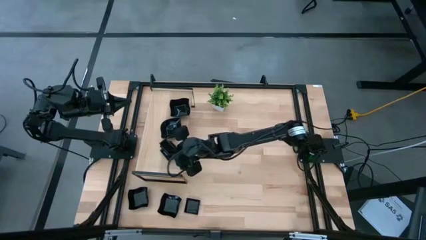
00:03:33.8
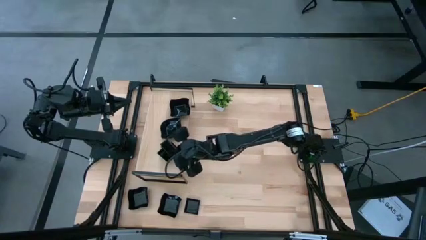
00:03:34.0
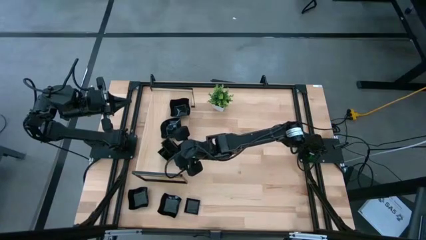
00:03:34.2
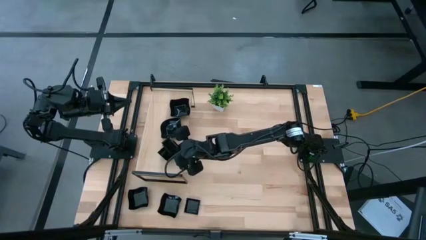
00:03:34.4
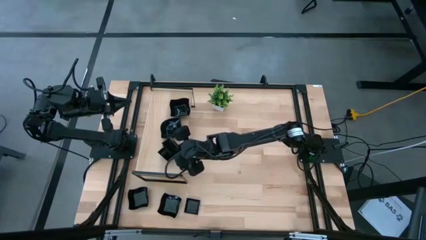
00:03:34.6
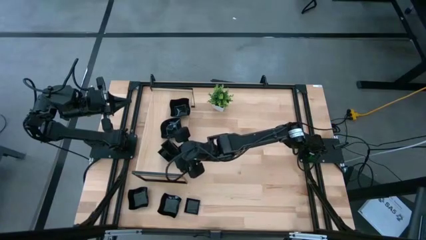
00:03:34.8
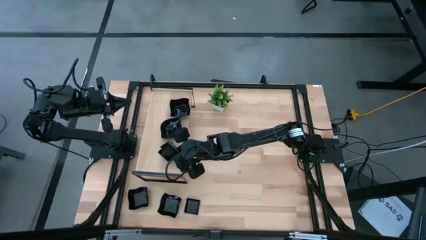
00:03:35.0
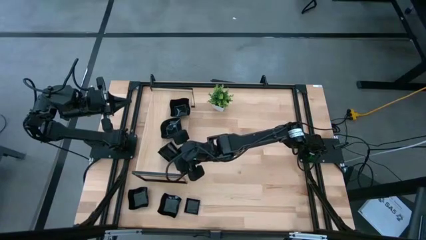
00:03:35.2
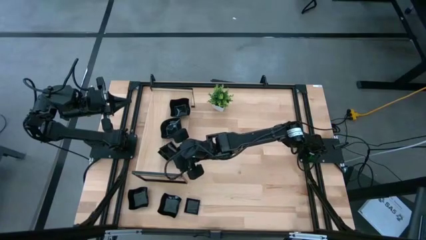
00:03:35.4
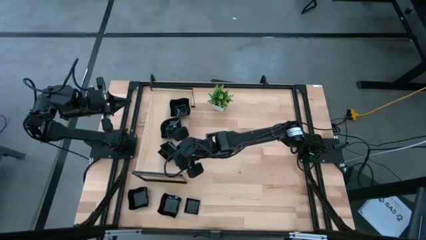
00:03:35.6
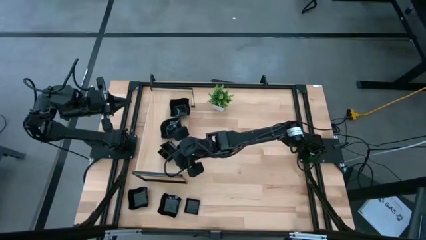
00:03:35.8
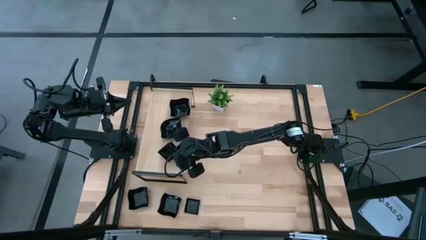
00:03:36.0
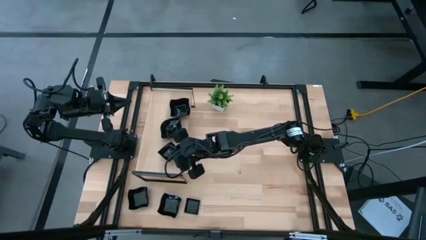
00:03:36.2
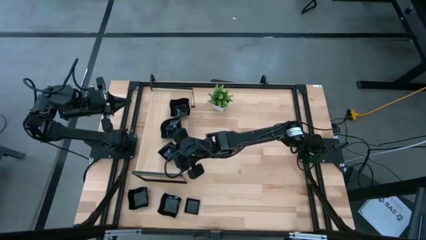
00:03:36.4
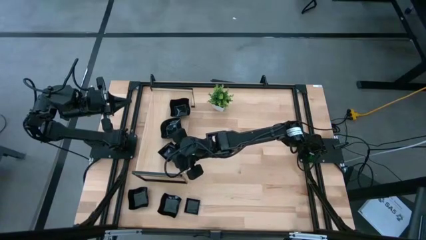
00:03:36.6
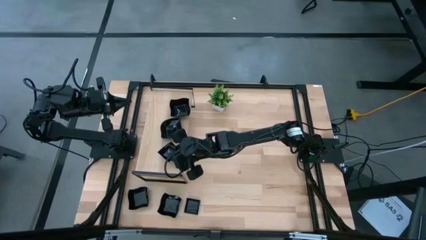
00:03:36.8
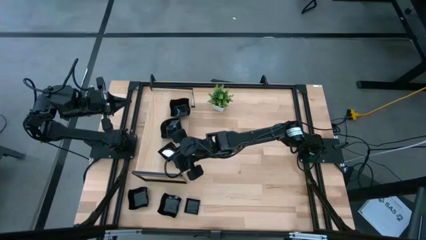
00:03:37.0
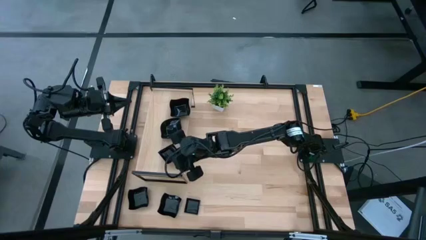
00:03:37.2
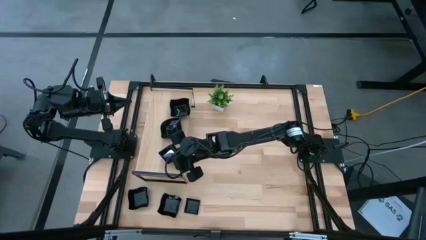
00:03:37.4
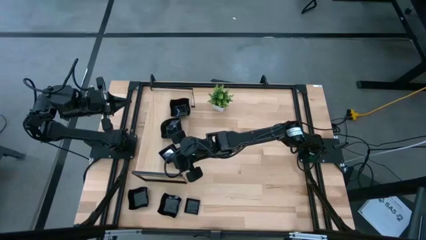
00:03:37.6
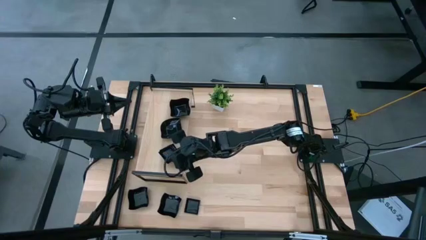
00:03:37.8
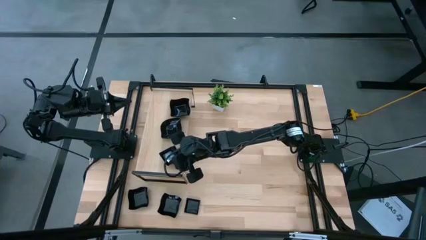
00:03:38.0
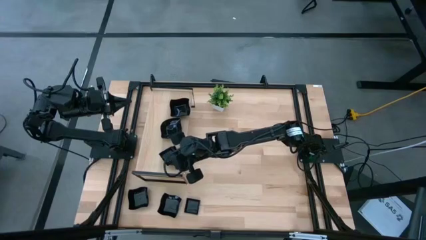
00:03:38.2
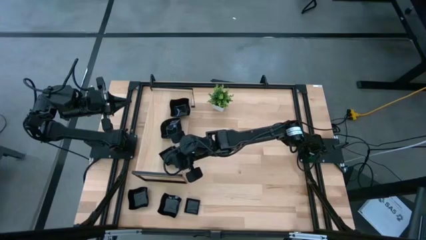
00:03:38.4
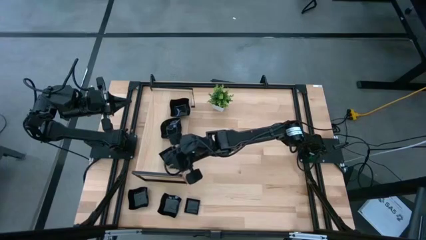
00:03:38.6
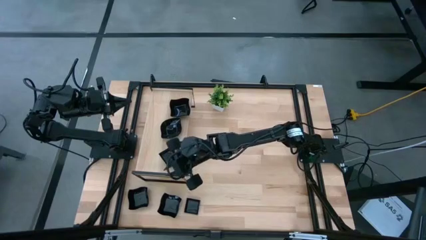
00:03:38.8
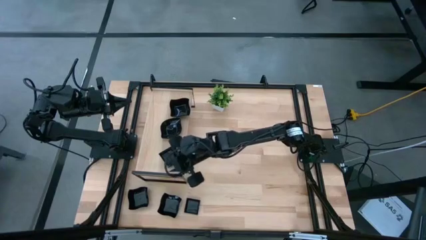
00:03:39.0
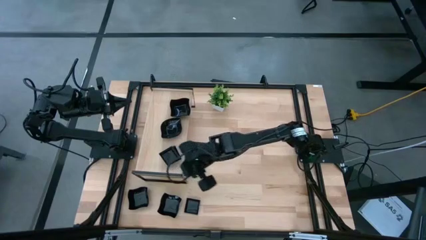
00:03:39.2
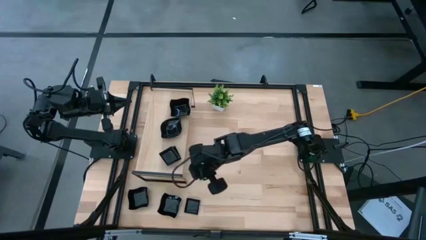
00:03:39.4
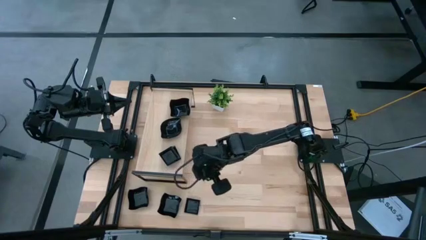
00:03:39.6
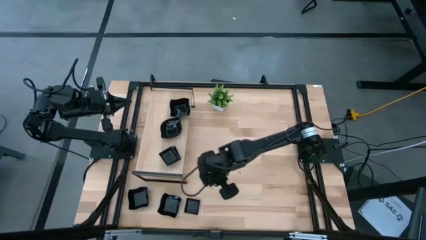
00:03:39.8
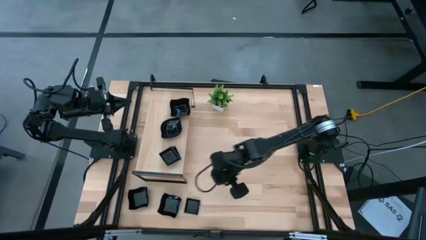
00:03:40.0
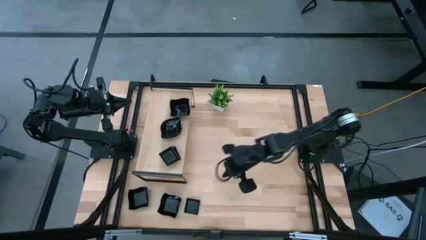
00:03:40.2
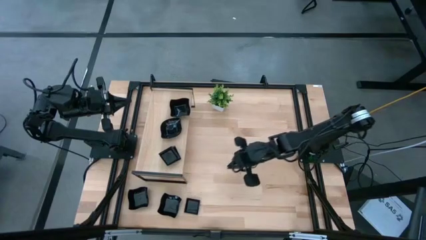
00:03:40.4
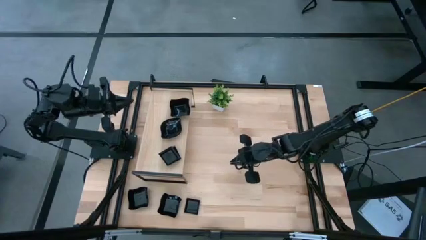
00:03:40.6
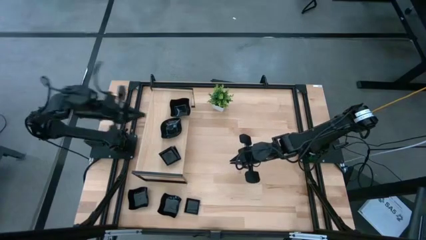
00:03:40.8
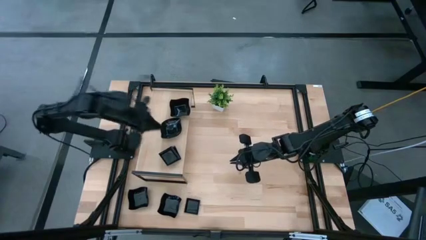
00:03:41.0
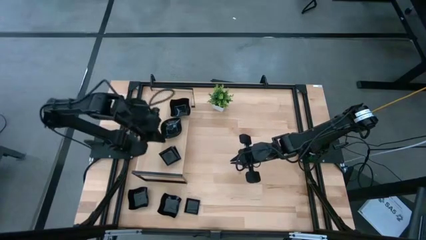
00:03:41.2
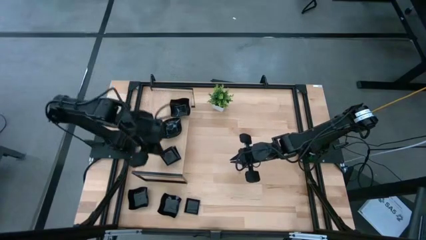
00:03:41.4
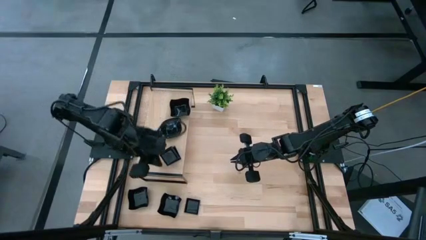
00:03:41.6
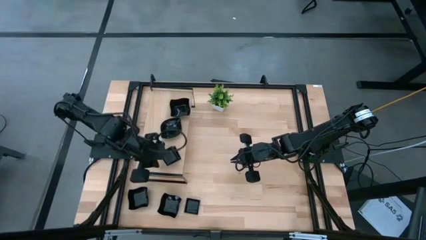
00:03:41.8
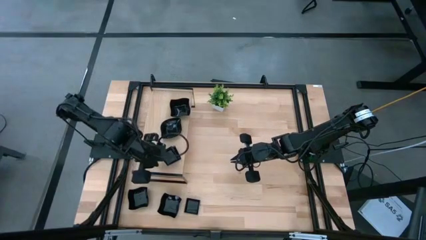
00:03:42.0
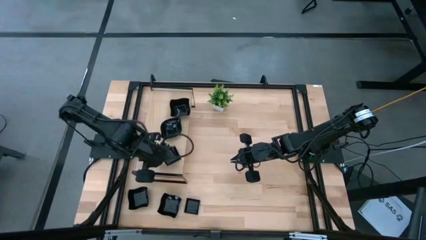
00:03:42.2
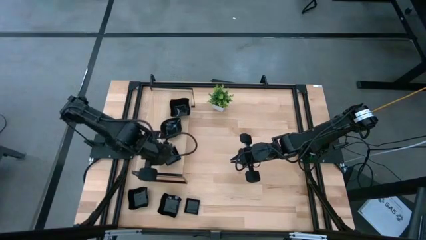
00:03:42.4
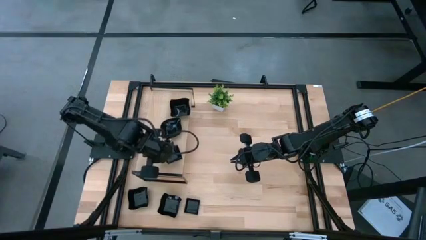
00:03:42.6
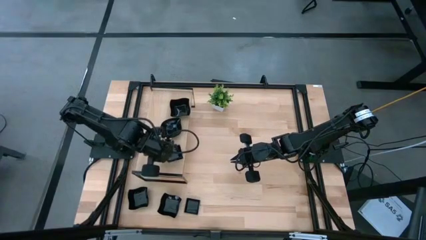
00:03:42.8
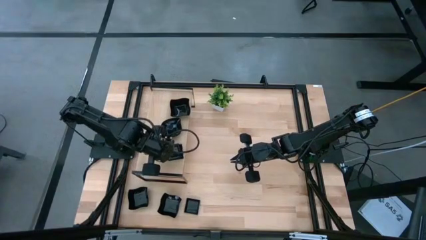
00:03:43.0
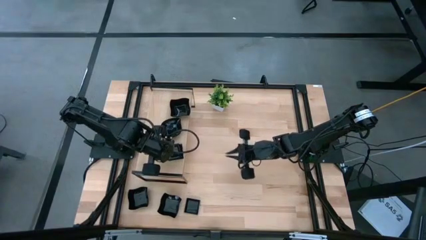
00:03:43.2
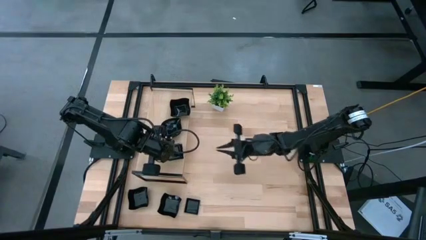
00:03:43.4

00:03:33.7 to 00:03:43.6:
Task: Pick & Place Mini shaped plates
Stack the black square plate on top of the black square plate on the shelf

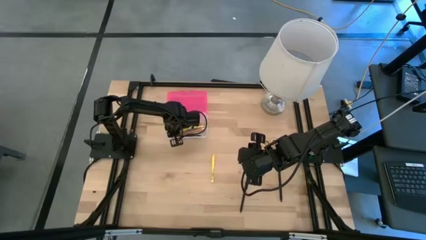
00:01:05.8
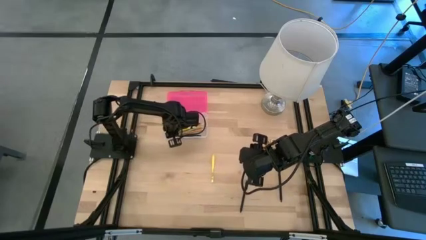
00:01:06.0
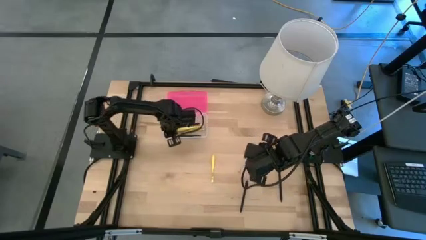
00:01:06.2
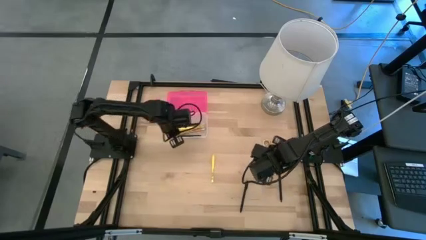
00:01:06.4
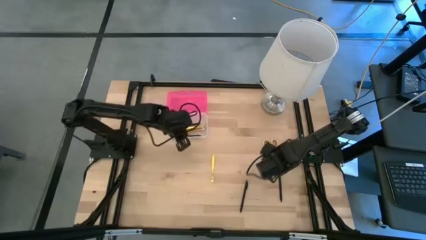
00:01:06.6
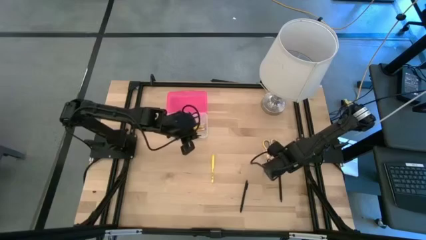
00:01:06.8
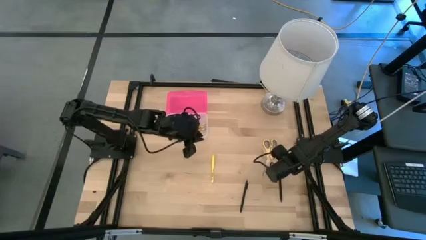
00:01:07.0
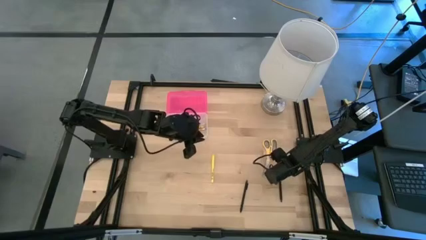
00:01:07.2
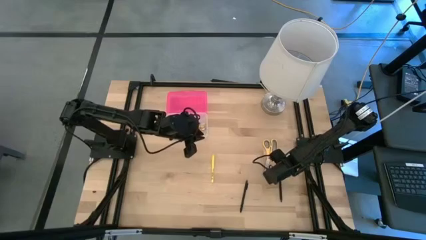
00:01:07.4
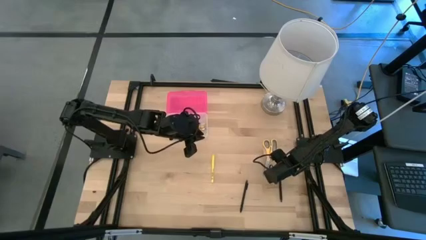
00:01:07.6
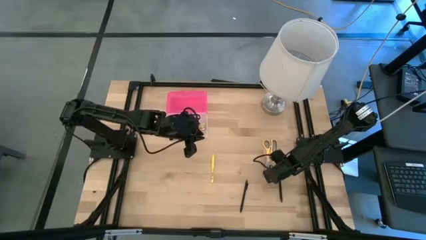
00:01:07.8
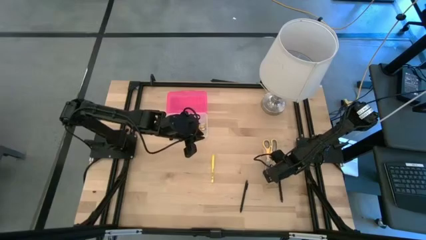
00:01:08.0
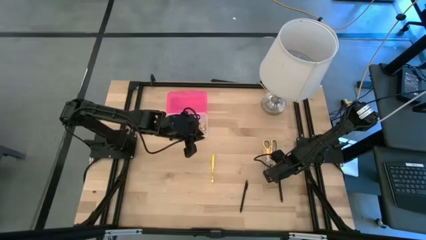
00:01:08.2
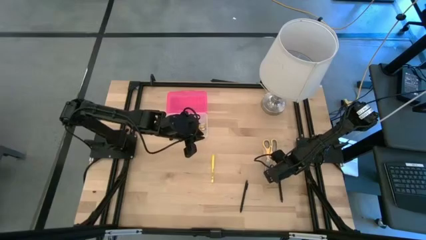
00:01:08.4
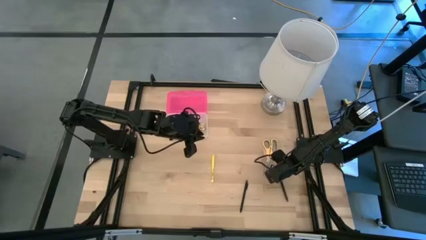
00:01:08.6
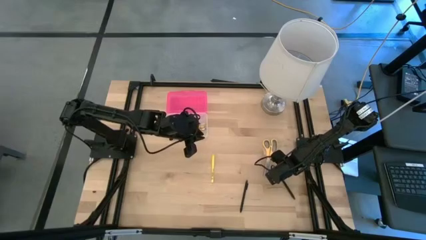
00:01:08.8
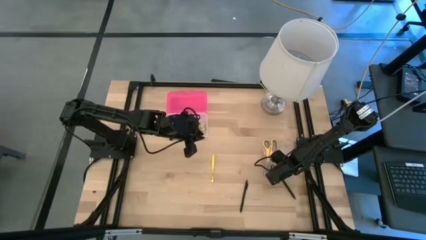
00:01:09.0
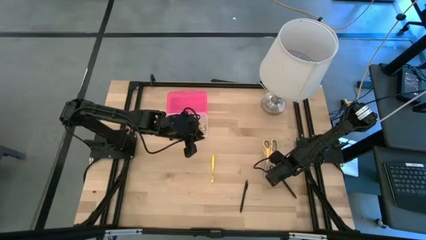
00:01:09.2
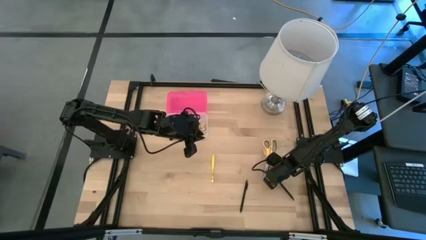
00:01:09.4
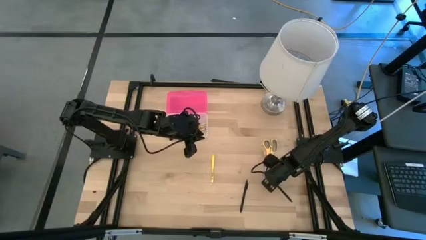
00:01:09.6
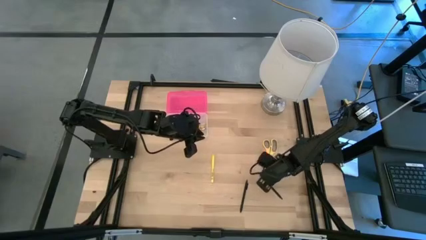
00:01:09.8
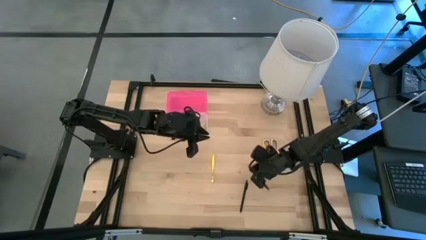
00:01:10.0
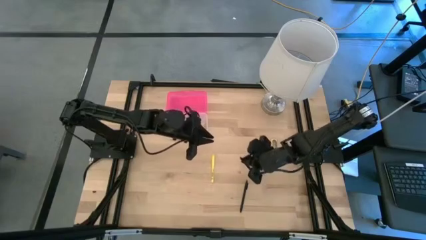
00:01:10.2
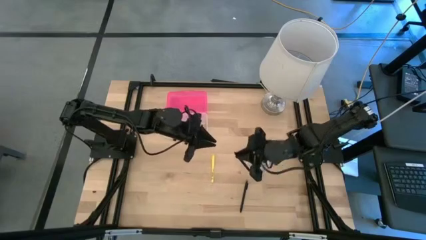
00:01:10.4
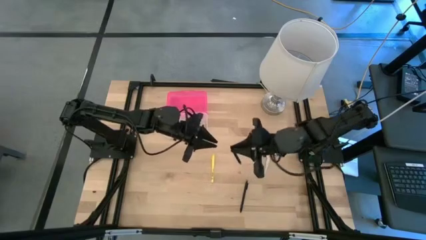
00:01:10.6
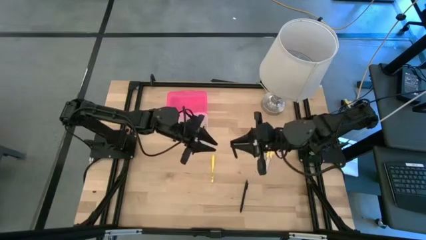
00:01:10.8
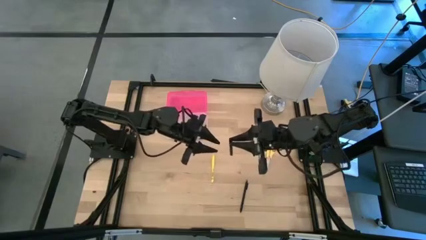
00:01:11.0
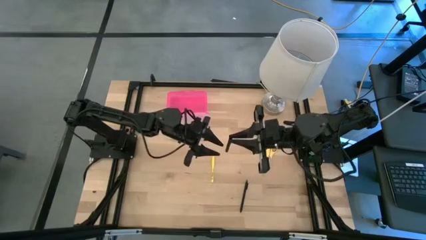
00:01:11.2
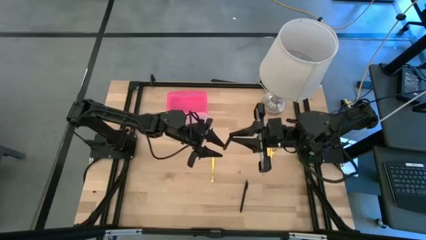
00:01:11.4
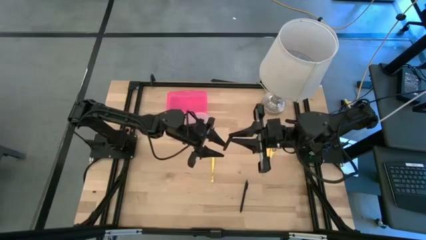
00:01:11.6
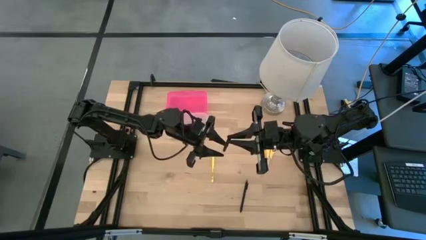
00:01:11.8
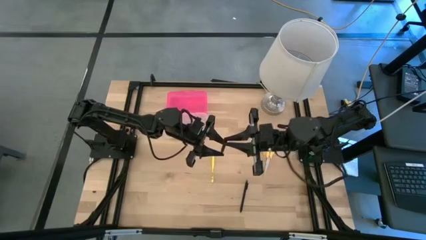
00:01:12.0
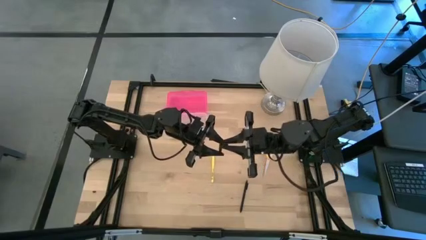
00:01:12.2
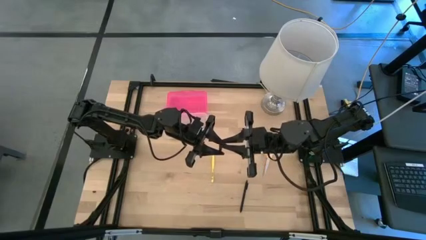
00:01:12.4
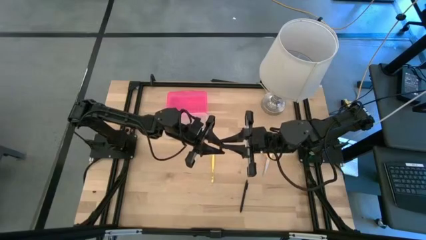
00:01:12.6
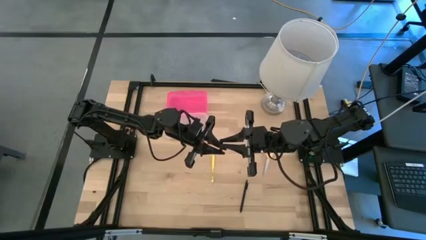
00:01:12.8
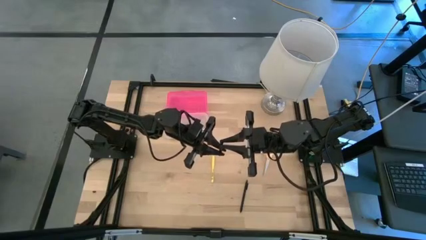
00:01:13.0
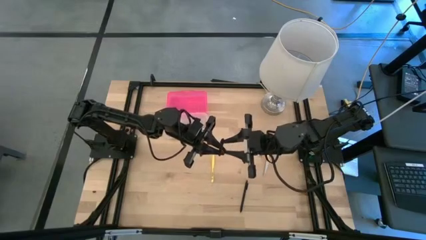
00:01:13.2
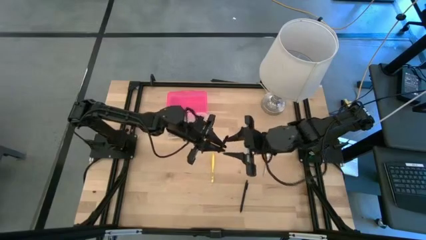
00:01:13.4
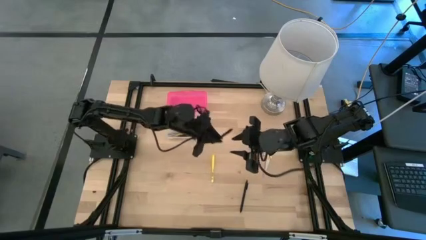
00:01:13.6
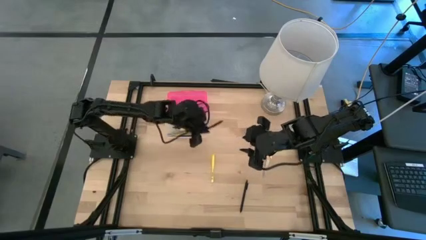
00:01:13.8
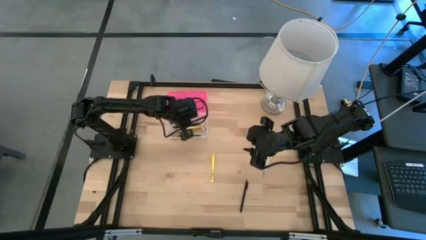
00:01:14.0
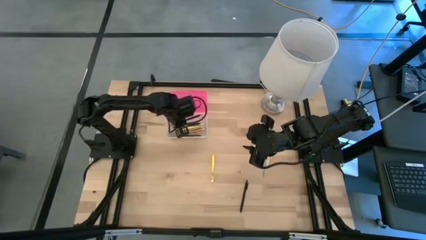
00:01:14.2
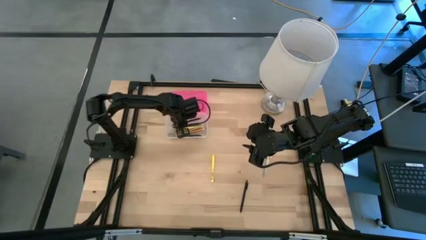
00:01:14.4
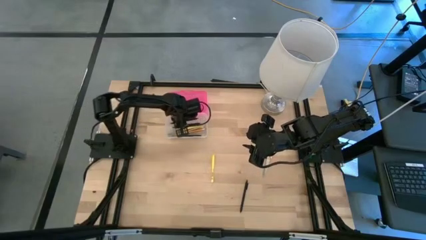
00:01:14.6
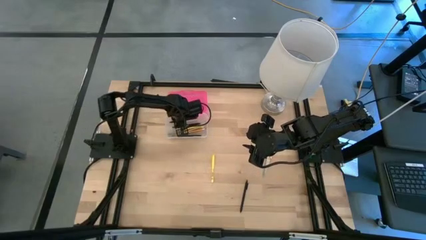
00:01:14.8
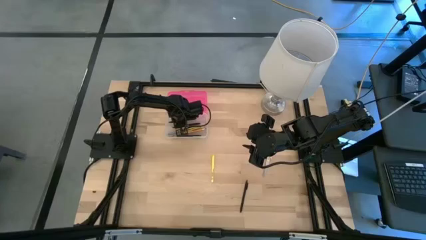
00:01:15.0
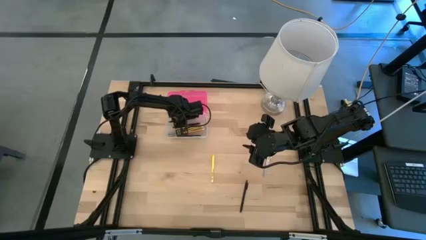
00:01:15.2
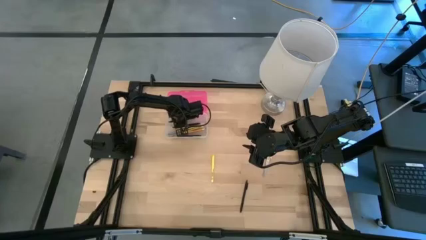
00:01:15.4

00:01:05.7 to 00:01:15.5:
Task: Pick & place school supplies into a supply box
Put the black pen into the pink supply box
